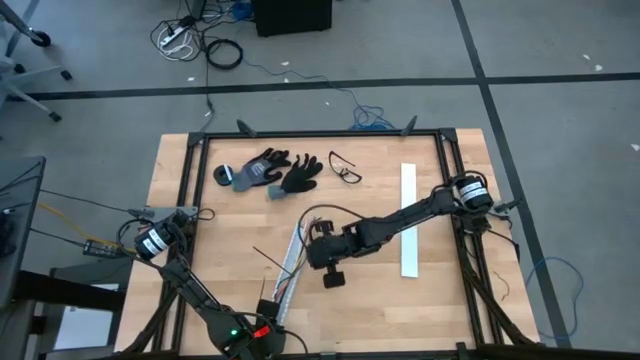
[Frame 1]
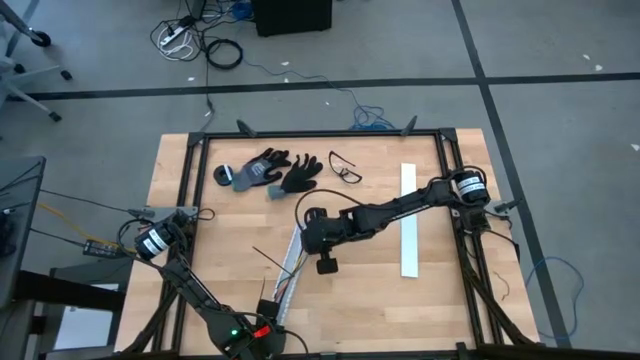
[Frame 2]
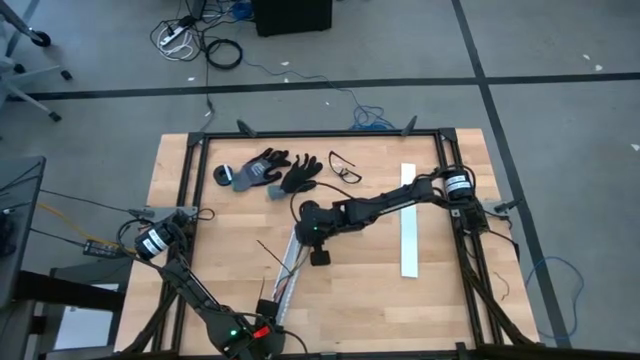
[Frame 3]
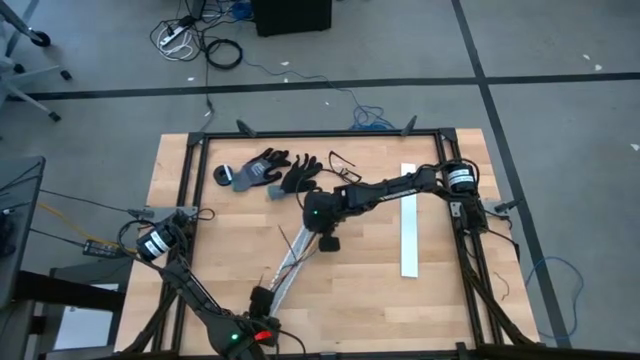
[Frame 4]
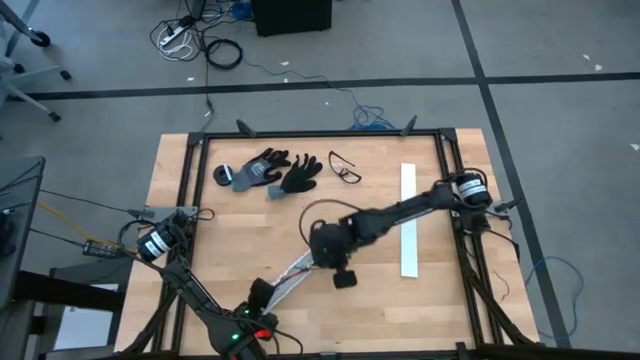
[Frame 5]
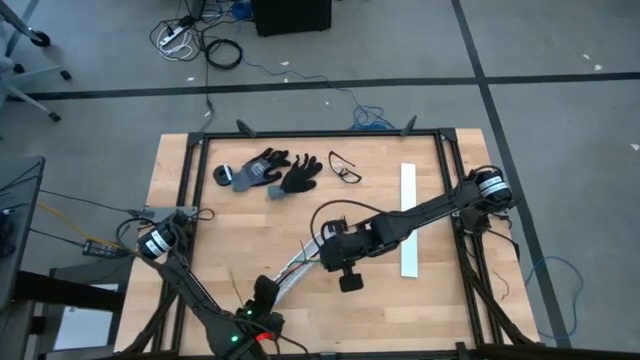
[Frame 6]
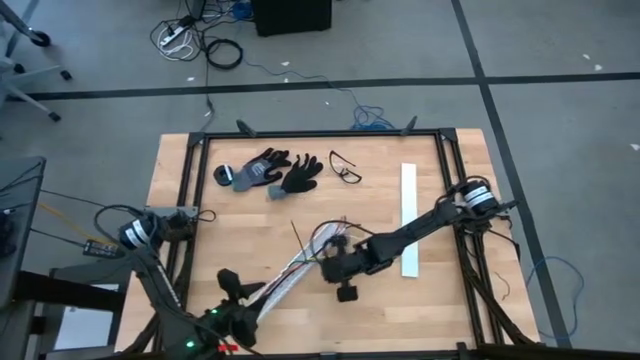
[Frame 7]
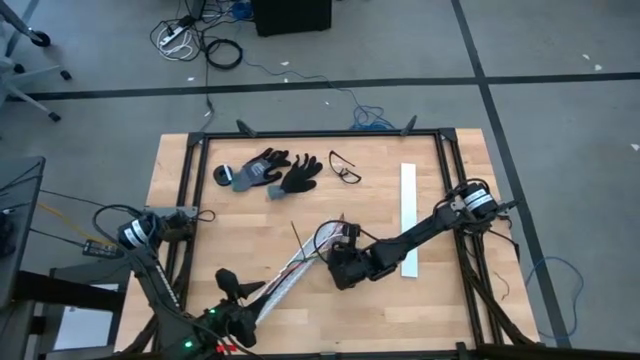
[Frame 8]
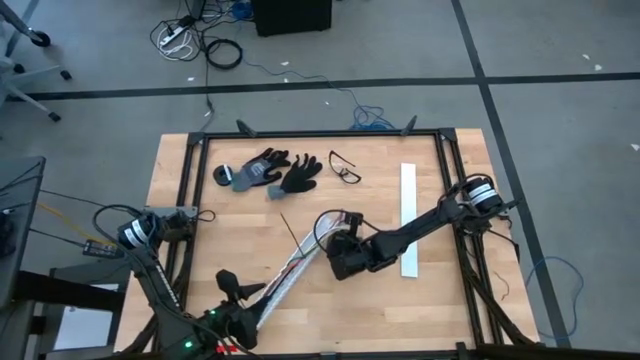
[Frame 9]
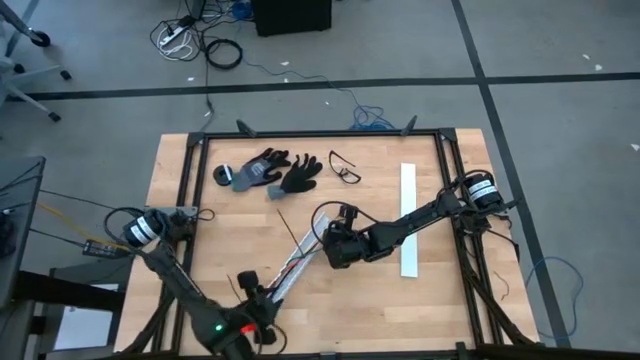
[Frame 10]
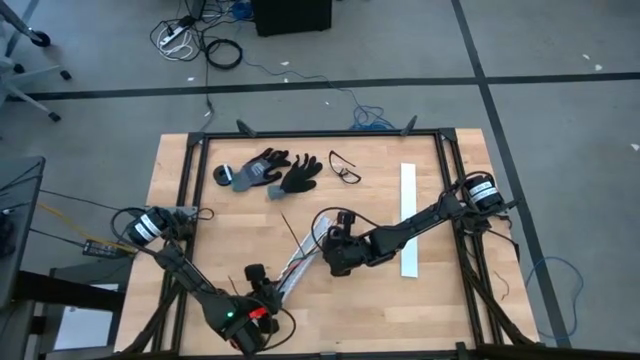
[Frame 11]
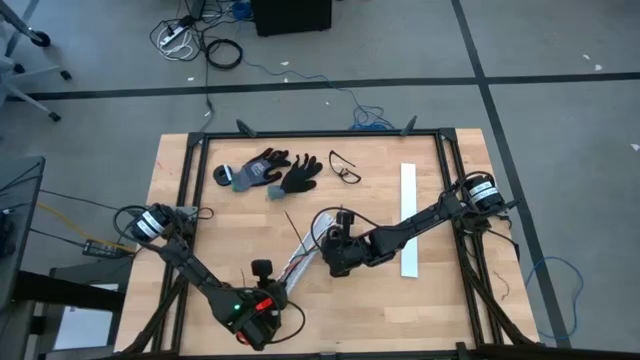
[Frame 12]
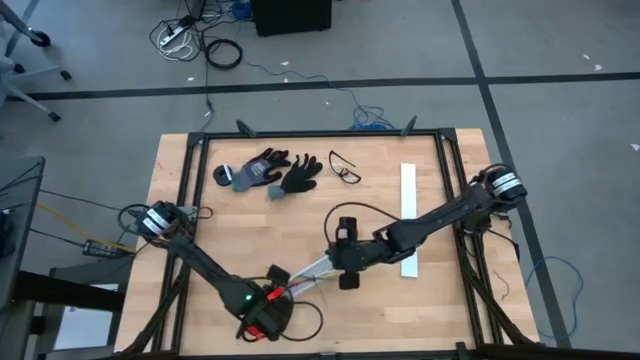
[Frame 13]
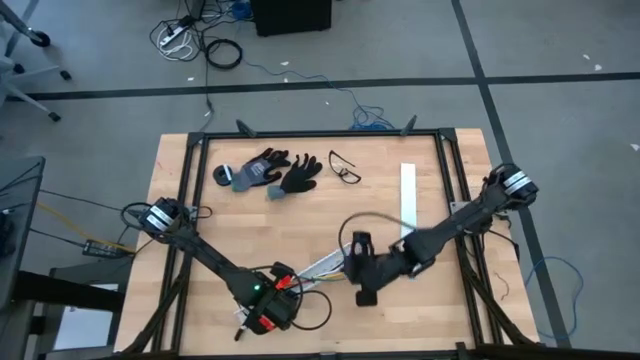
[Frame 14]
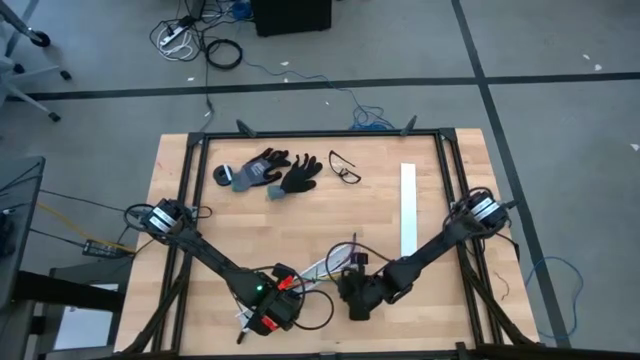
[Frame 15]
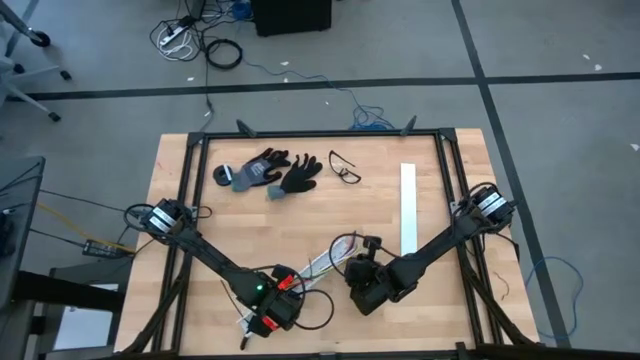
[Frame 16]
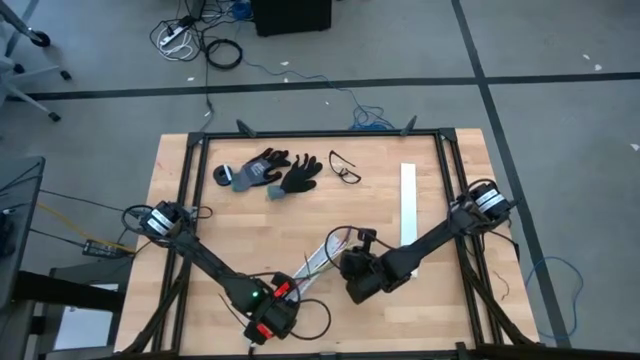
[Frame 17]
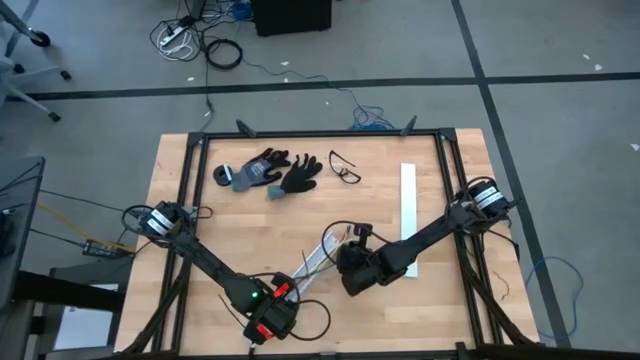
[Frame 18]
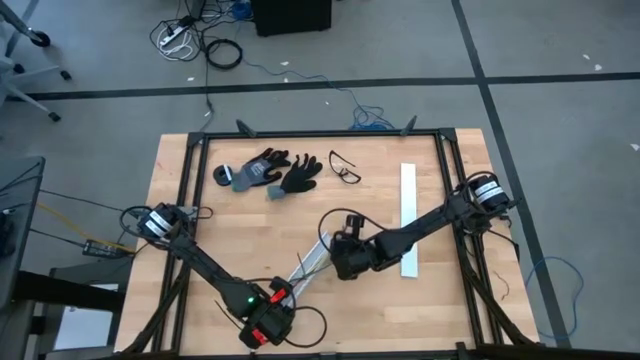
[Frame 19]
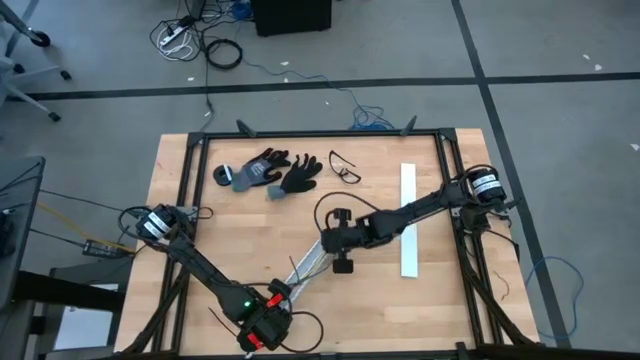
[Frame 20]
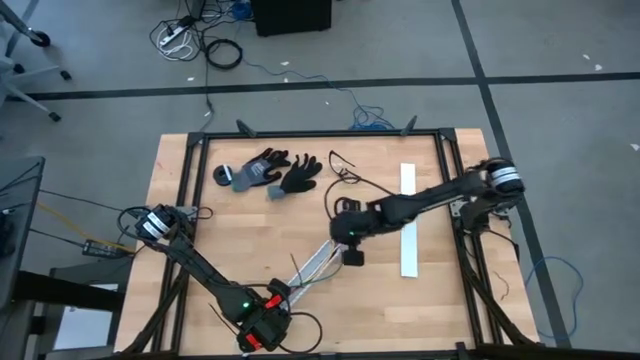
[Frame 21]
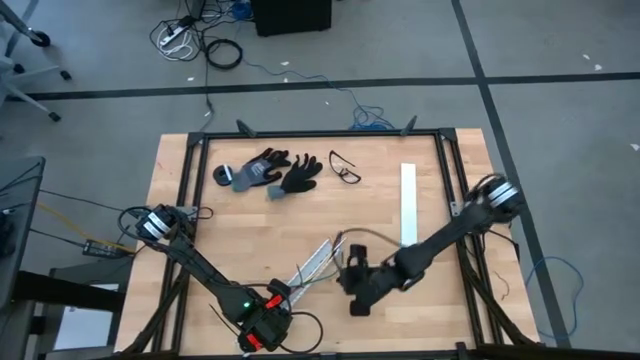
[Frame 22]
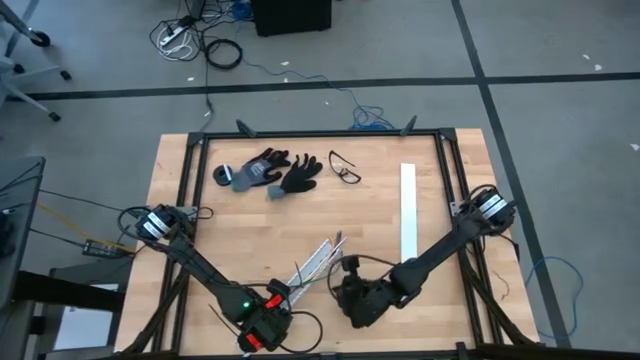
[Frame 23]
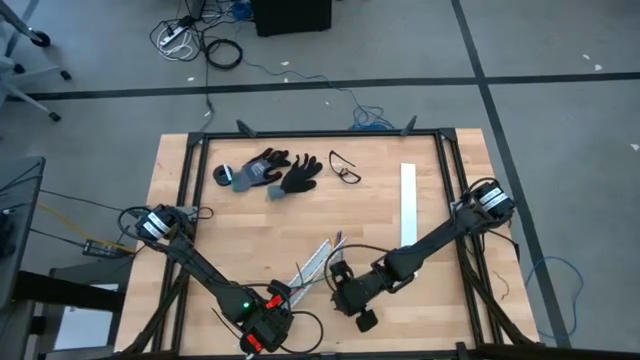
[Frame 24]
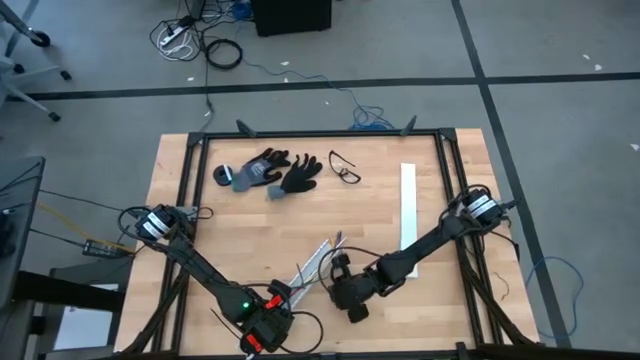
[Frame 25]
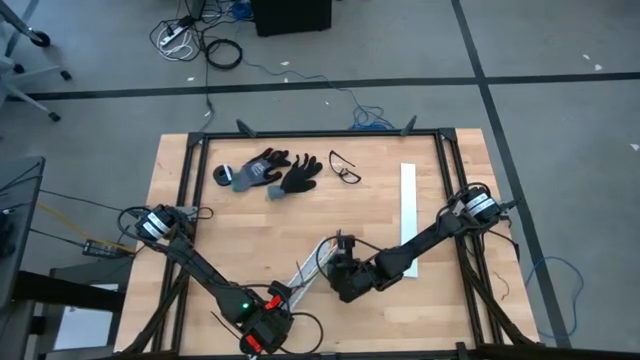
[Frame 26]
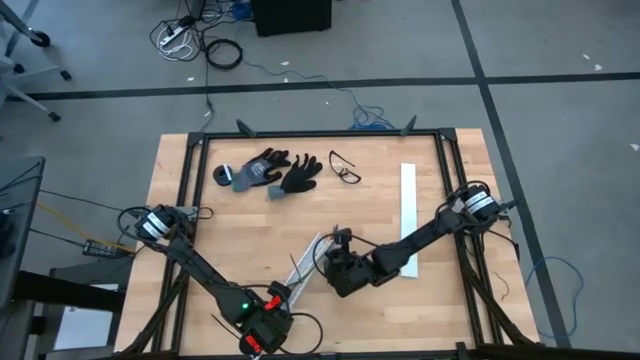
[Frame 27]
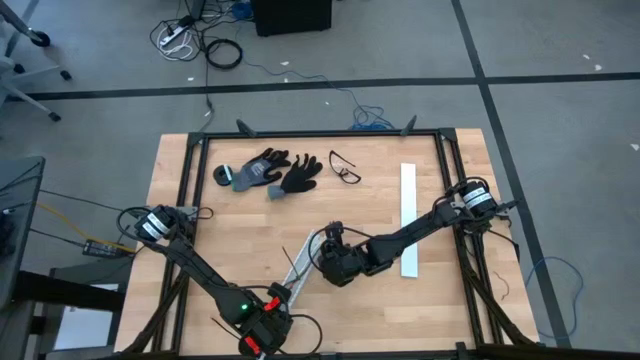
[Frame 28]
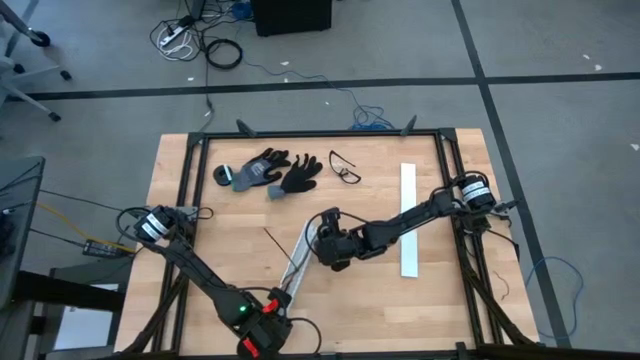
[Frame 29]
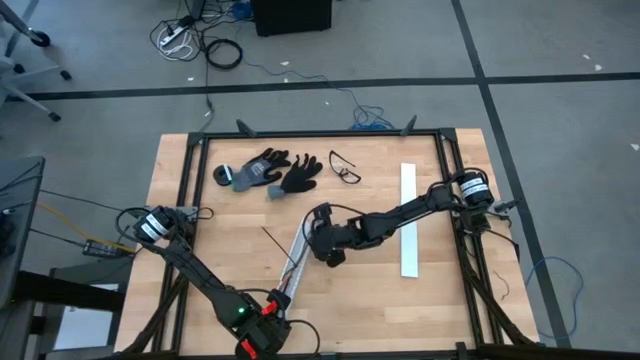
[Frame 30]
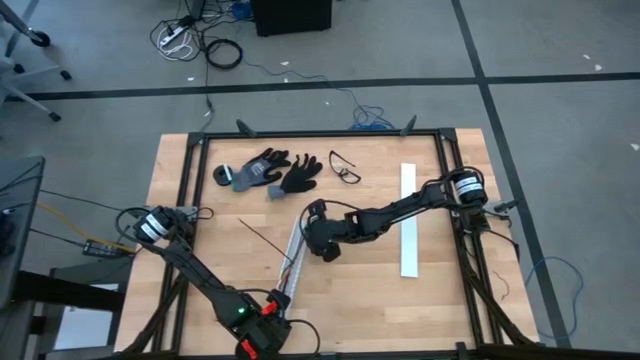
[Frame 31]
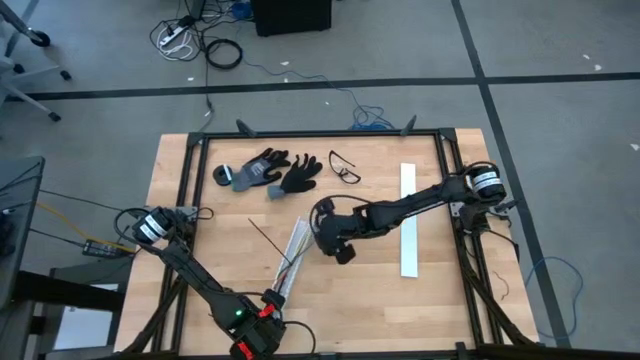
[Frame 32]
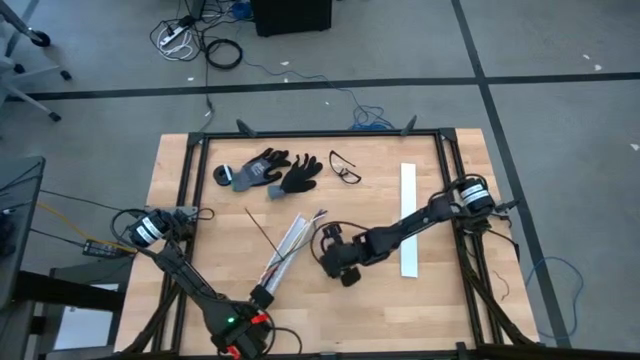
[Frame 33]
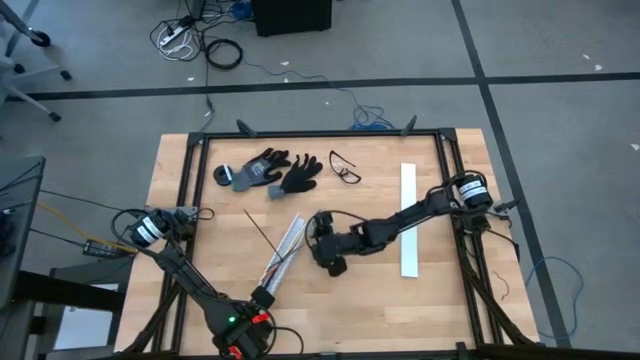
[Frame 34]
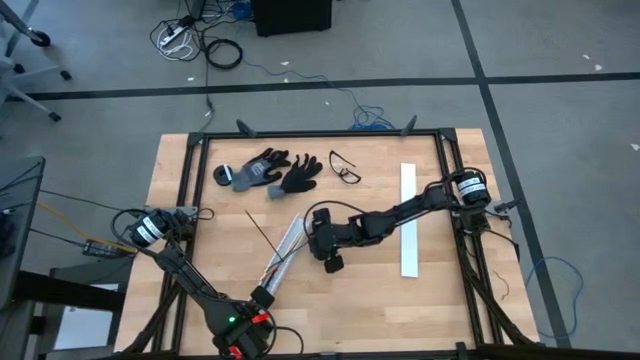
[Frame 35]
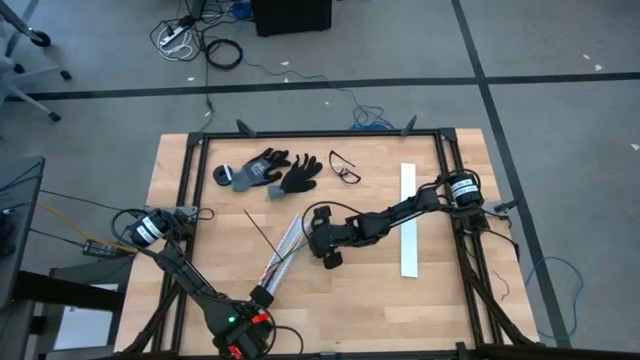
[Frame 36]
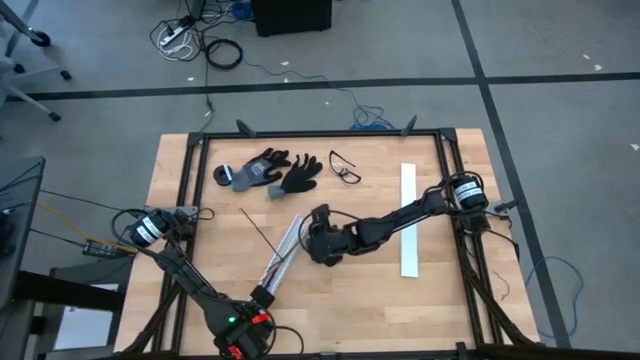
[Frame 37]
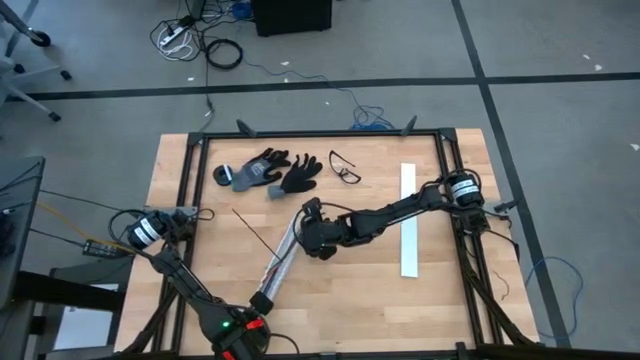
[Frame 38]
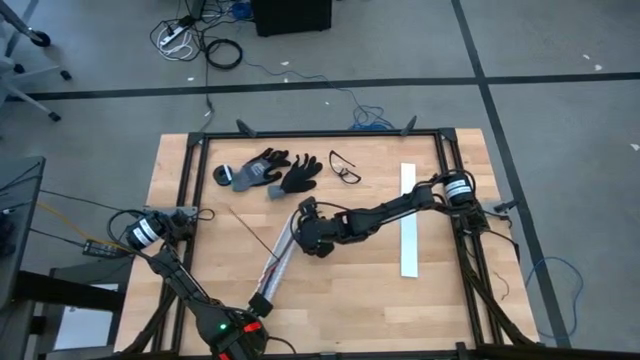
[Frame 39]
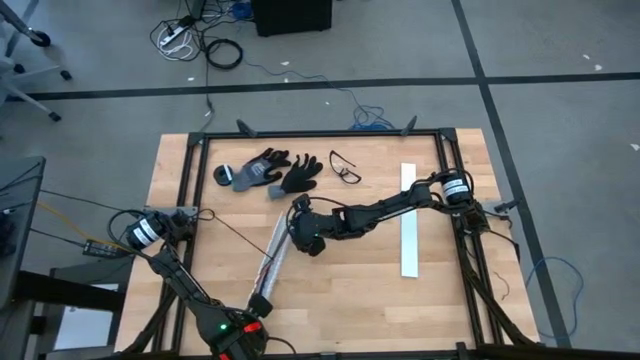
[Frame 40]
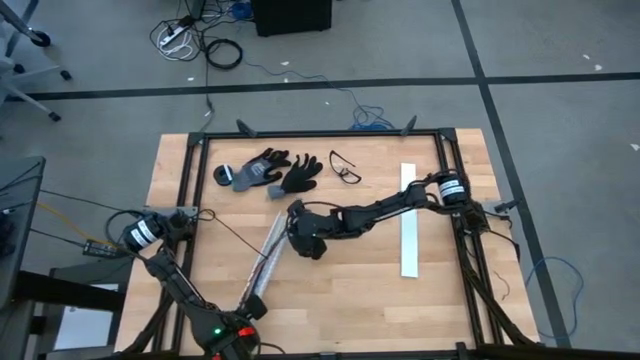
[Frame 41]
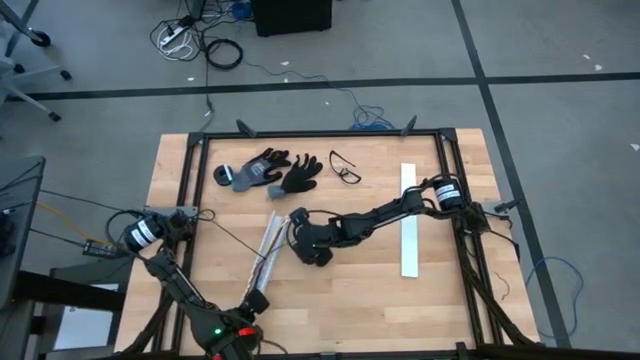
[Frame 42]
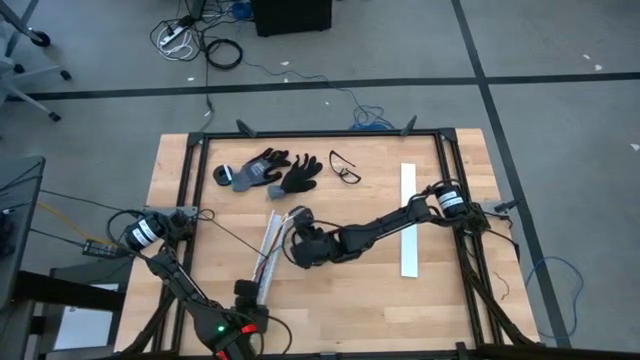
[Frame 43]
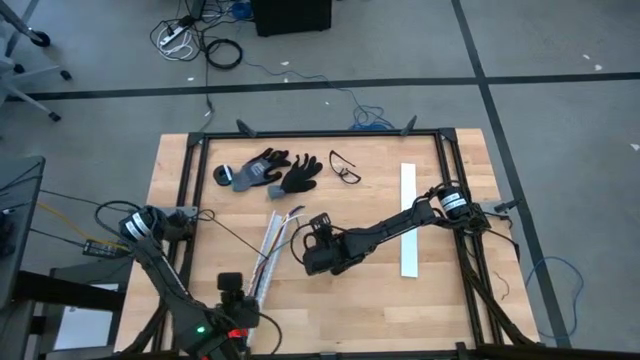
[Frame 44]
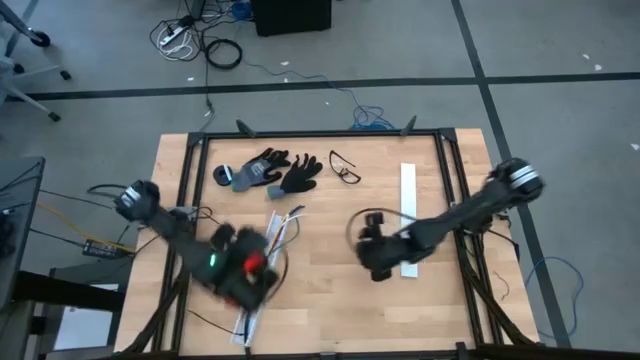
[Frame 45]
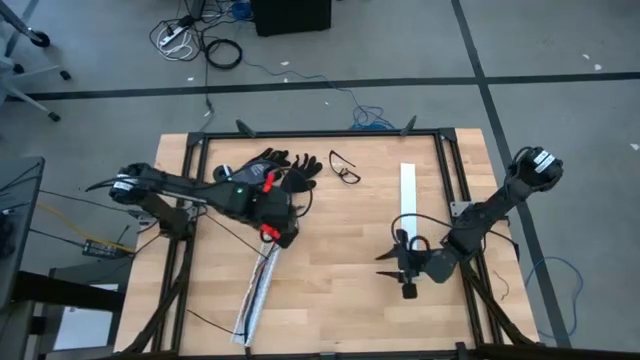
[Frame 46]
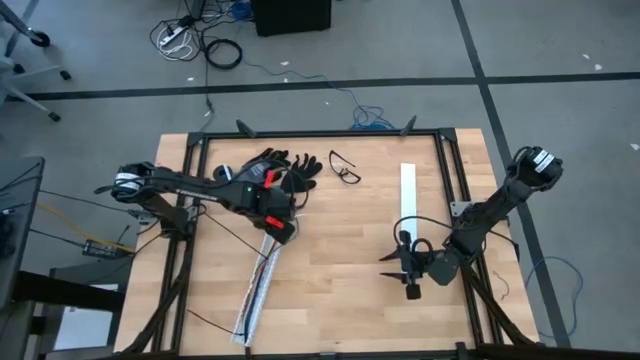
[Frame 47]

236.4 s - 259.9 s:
Task: Ziptie cables
Put the ziptied cables in a white cable duct
